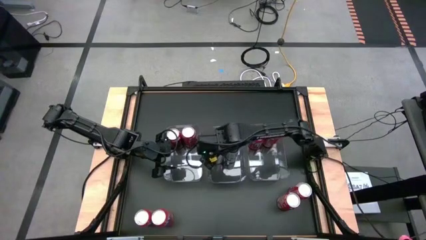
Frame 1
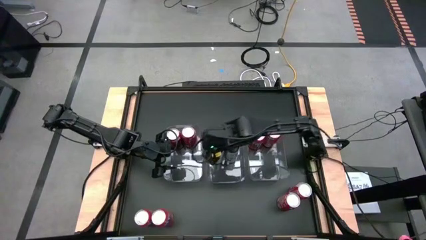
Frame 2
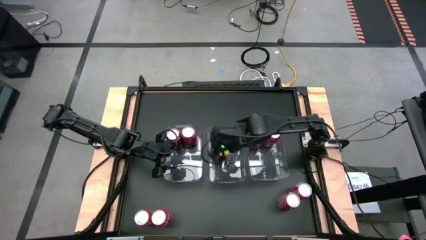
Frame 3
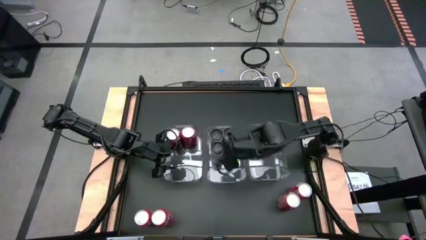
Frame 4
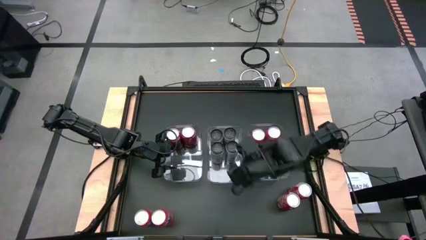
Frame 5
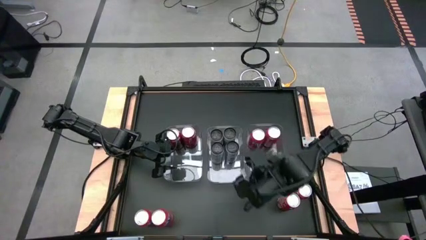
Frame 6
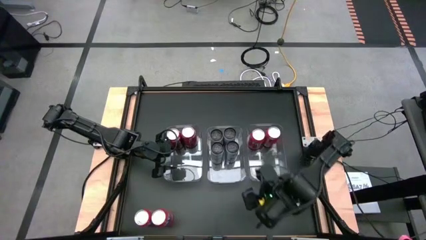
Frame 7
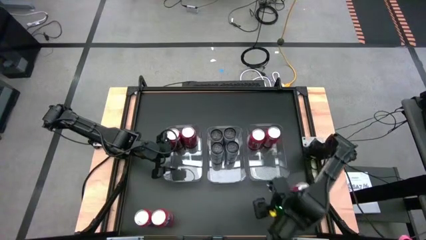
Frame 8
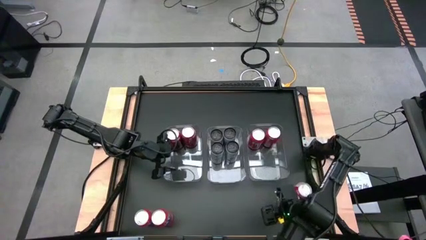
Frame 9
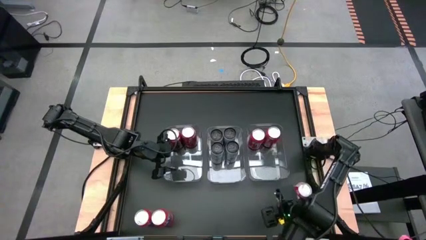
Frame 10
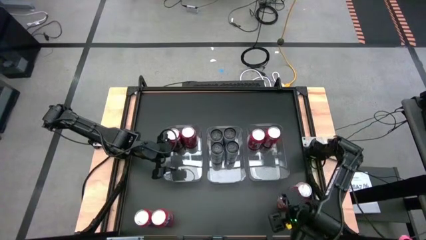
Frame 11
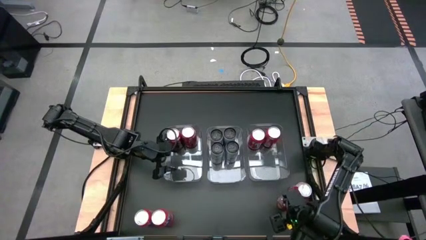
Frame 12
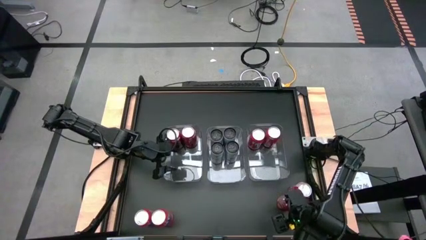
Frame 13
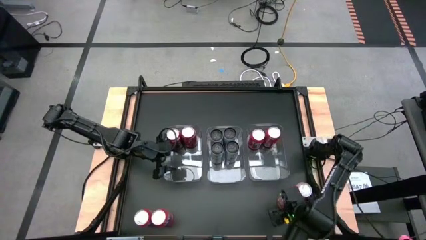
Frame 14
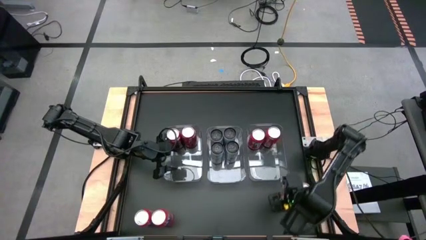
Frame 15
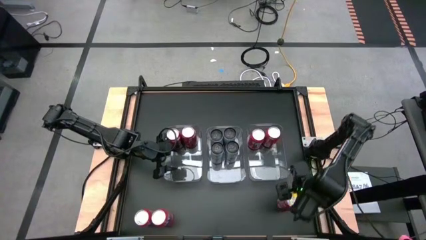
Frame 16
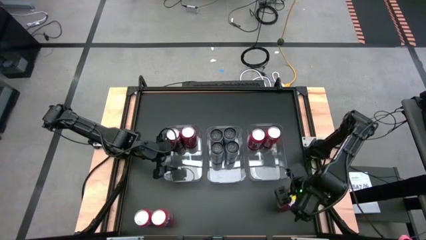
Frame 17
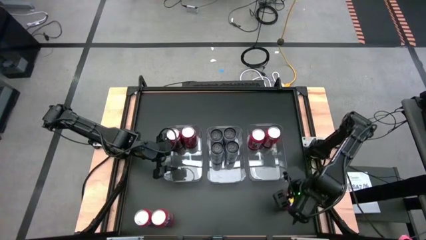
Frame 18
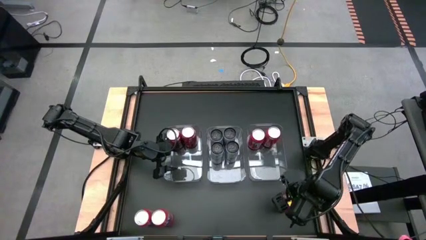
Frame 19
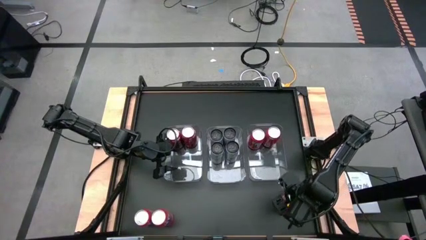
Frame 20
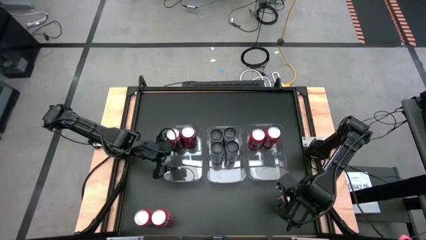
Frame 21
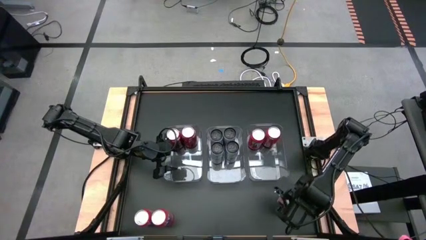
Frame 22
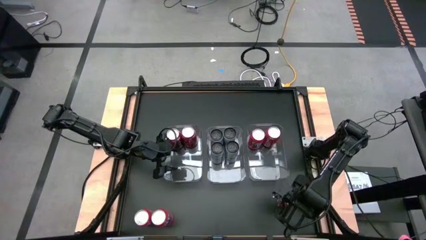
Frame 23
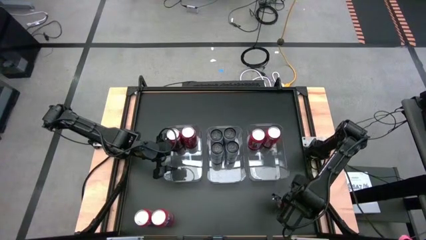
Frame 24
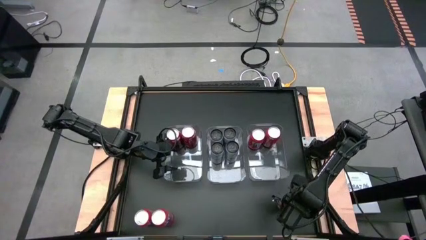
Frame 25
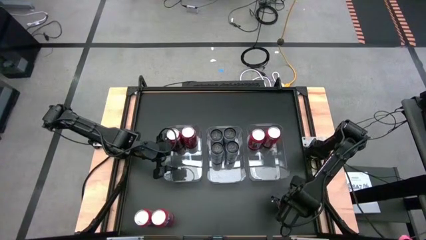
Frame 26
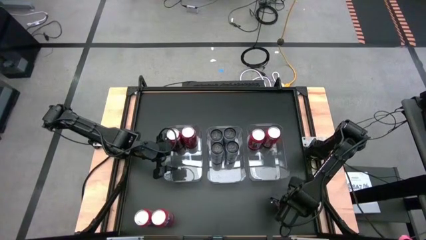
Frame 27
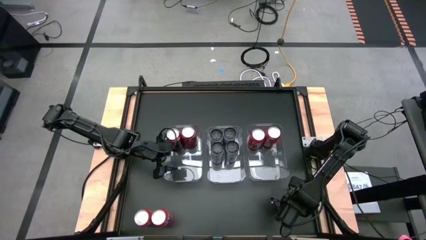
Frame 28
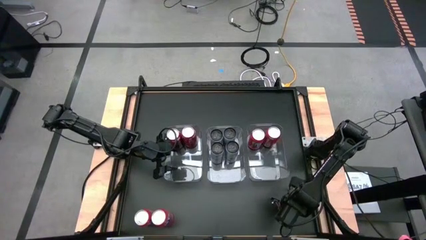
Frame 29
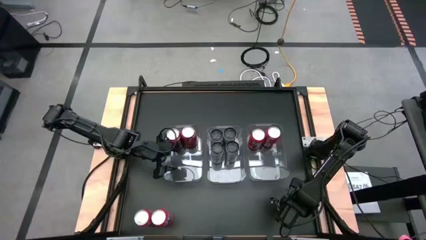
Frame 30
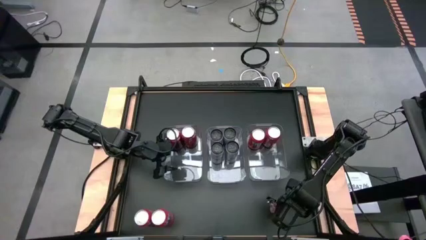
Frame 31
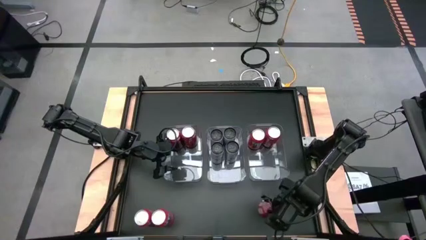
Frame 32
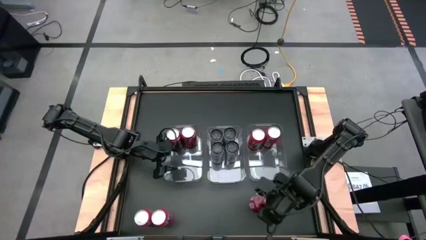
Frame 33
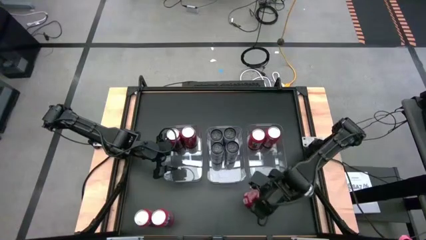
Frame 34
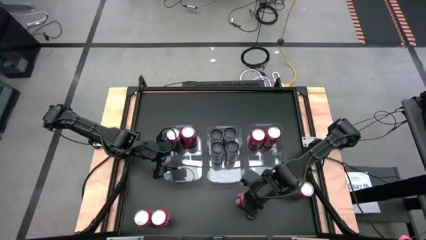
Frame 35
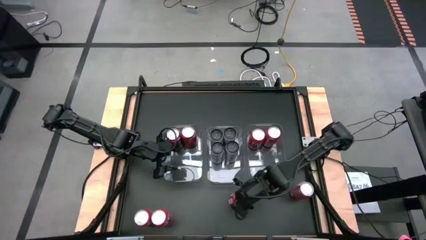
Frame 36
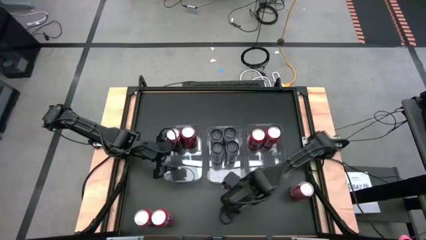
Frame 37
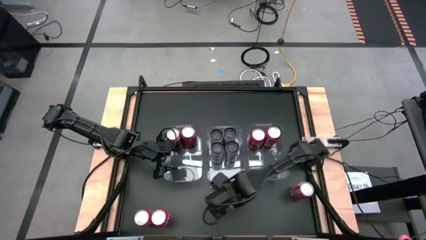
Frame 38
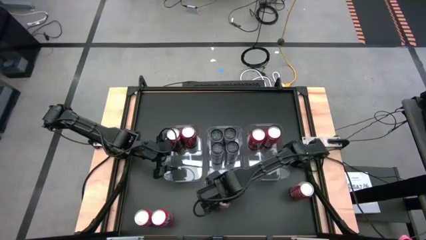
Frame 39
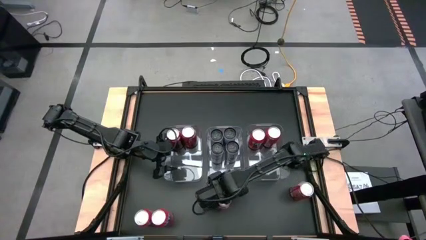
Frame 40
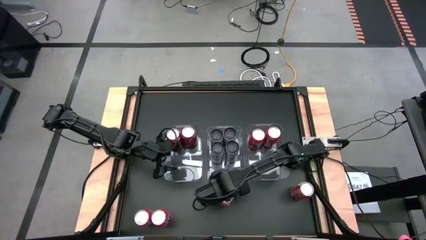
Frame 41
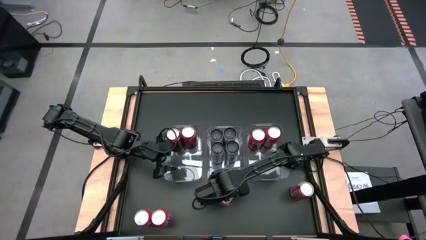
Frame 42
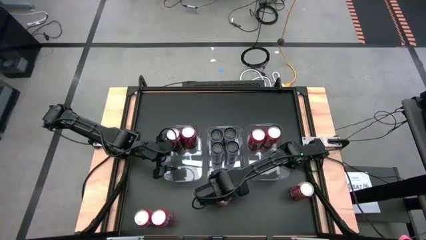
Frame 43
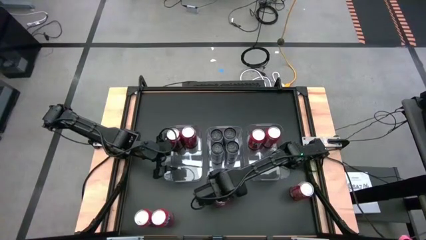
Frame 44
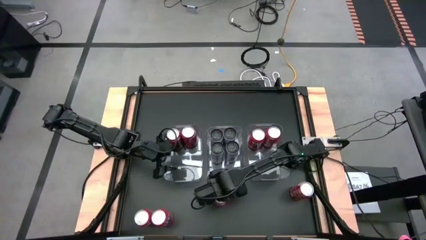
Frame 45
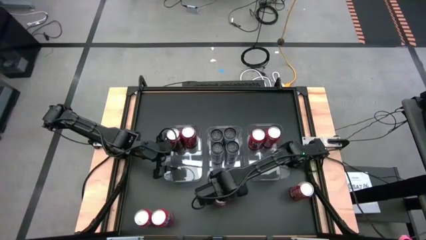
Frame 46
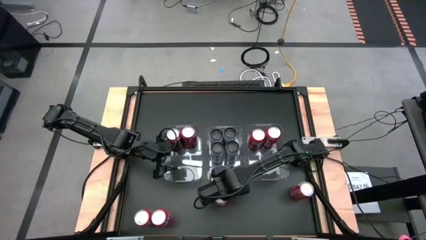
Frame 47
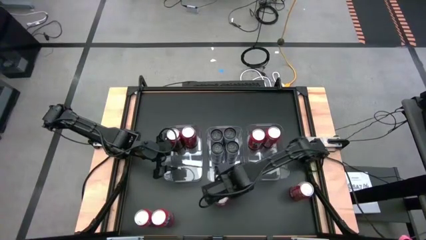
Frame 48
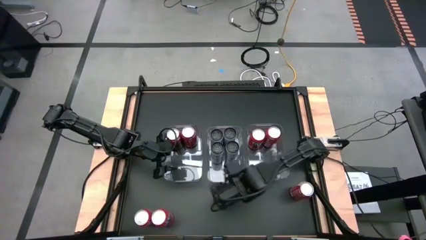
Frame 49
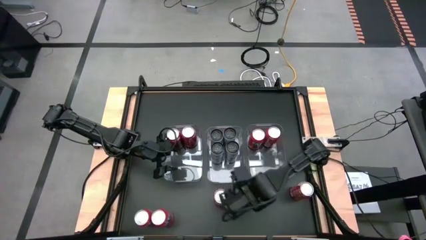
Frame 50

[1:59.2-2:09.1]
Task: Sort soda cans
Put the left red soda can into the left transparent bin

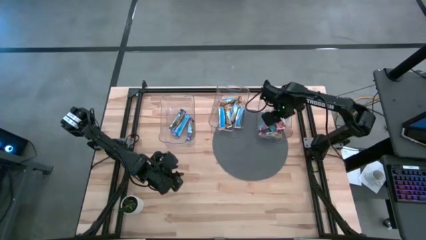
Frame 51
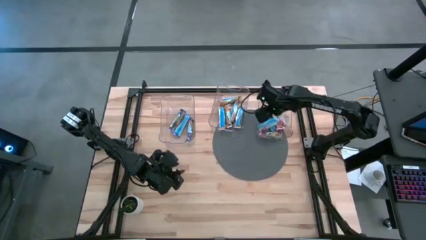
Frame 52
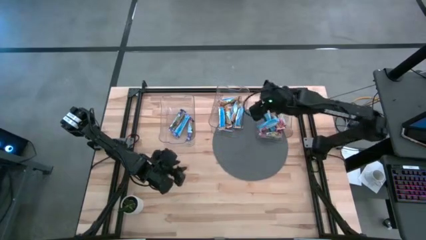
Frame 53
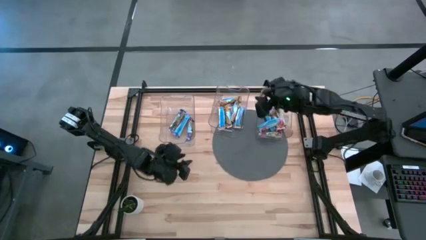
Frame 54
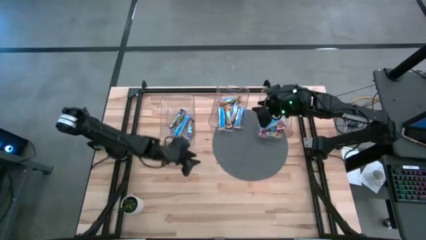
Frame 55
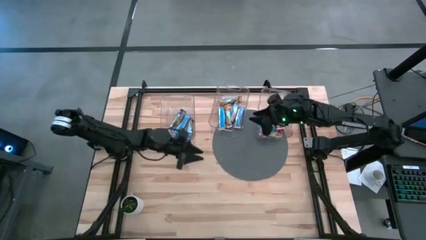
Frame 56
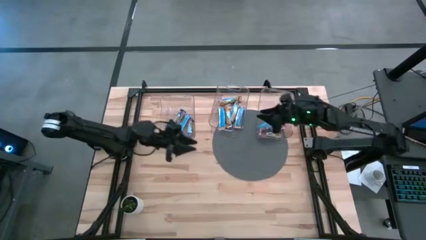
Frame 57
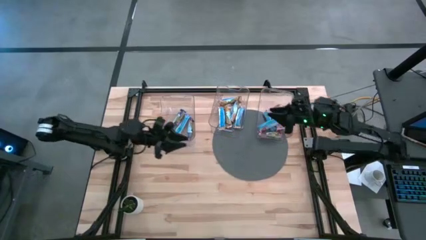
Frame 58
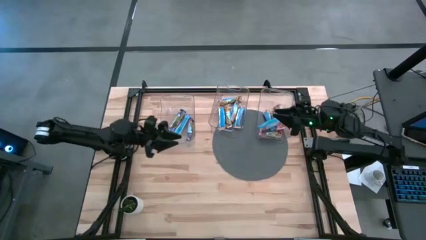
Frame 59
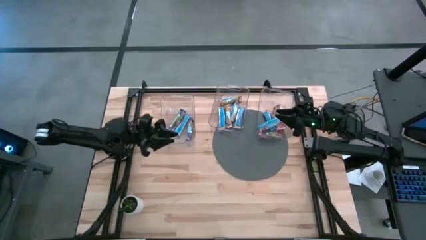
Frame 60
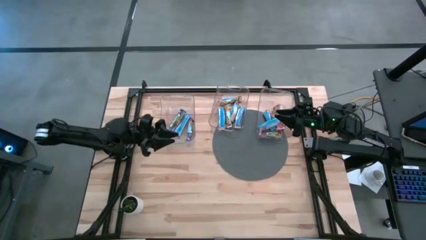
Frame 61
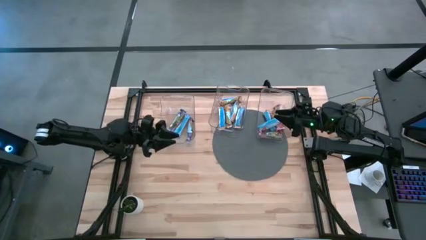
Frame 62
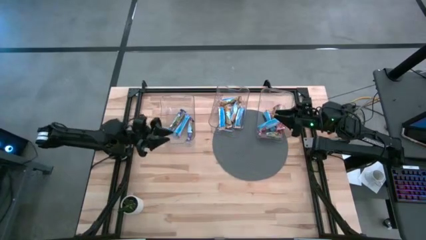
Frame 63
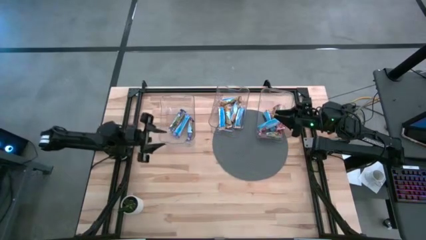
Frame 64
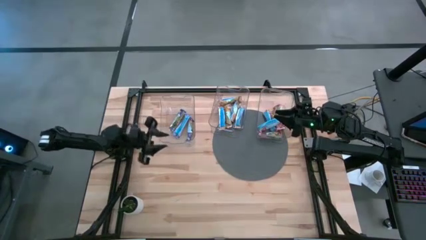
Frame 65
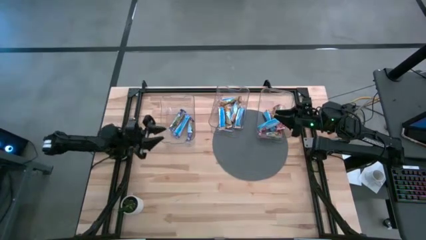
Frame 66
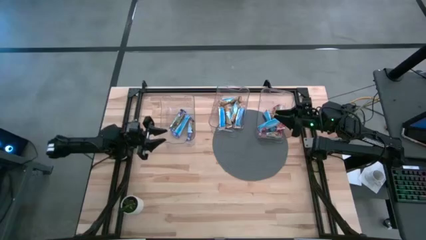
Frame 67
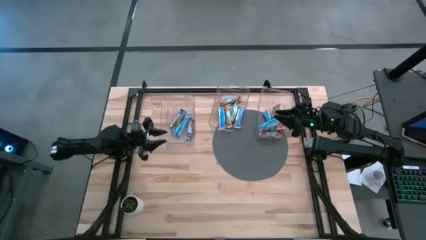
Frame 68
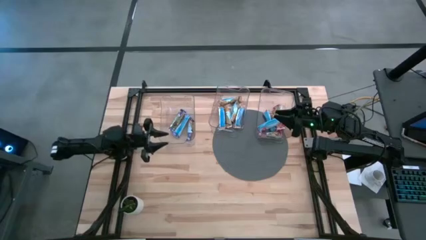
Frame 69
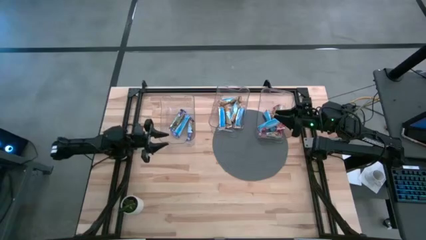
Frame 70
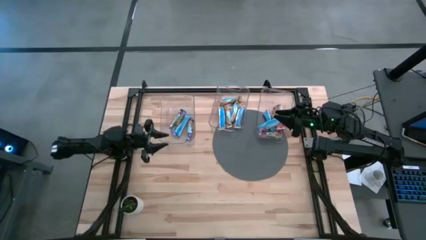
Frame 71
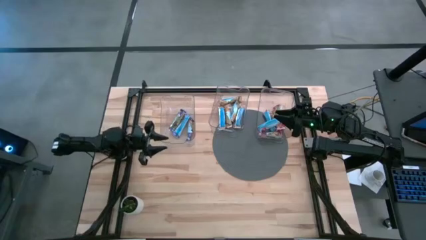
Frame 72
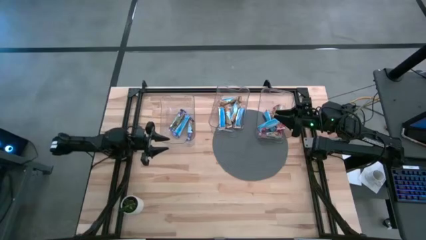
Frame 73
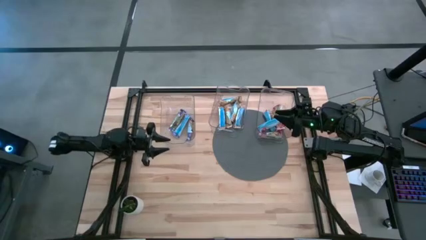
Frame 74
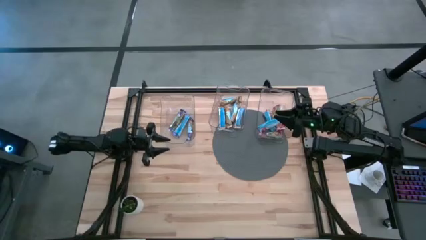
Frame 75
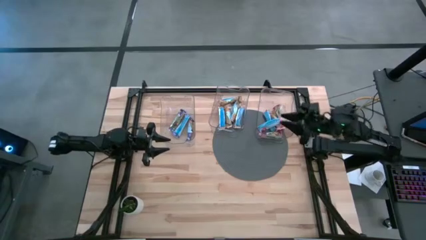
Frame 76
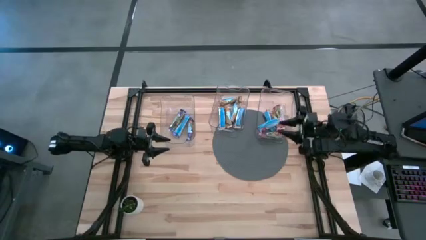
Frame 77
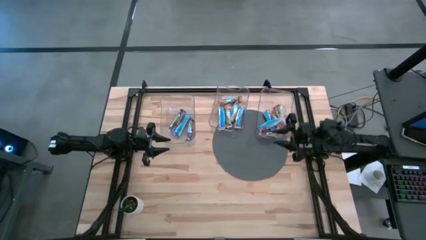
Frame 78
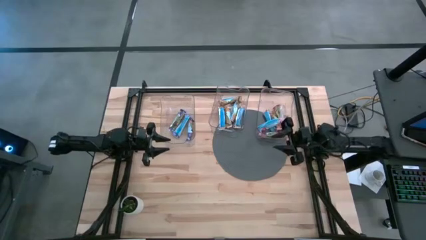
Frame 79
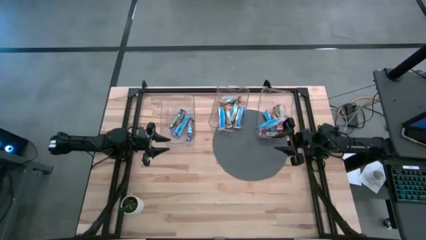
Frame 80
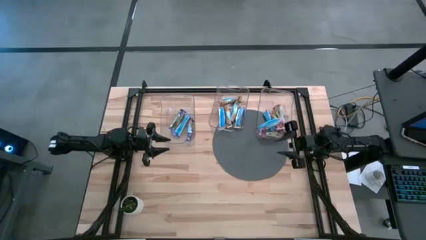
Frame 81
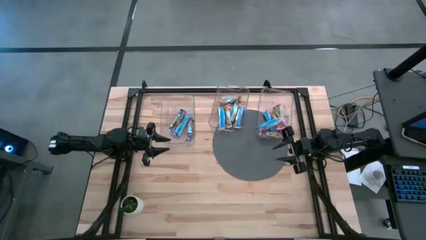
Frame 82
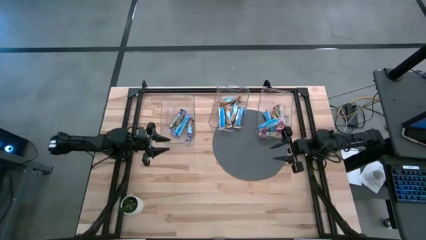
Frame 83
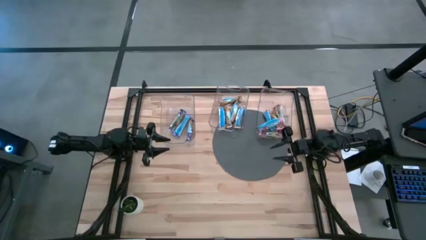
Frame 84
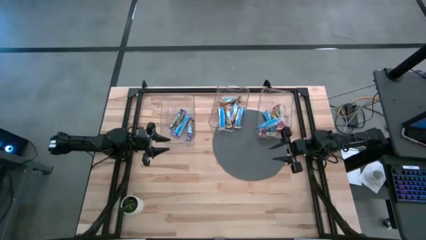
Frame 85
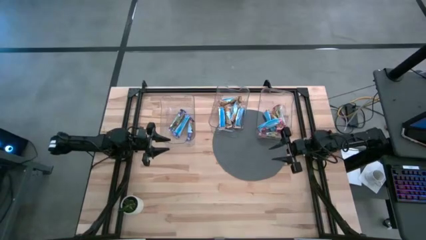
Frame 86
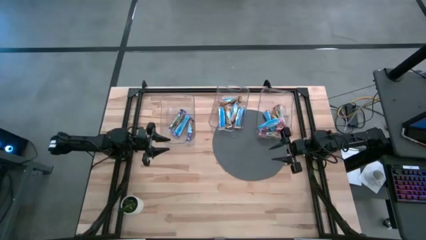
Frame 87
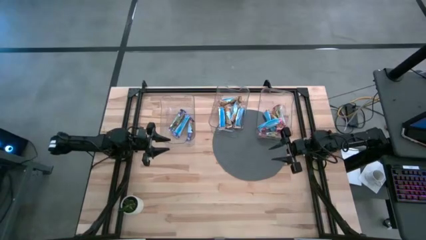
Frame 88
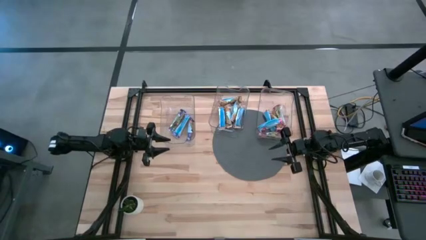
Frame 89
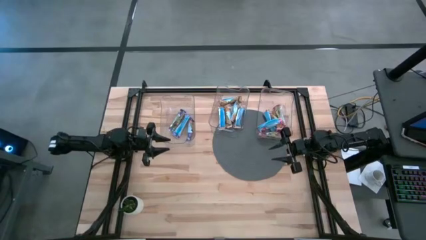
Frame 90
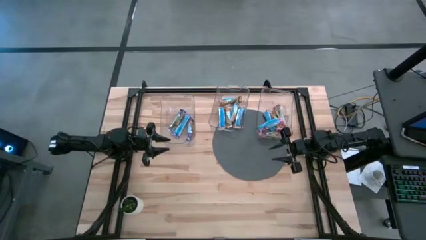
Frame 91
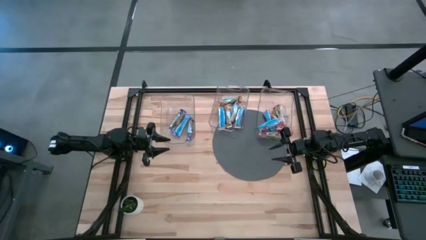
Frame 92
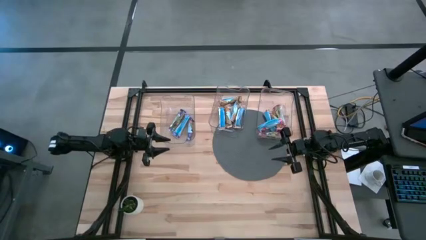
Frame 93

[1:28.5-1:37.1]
Task: Pick and place Granola Bars by type
Return to Home Position
